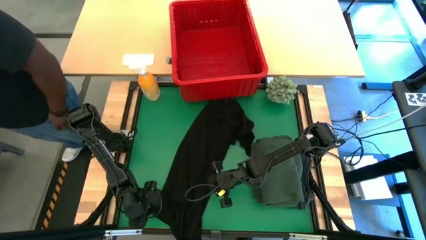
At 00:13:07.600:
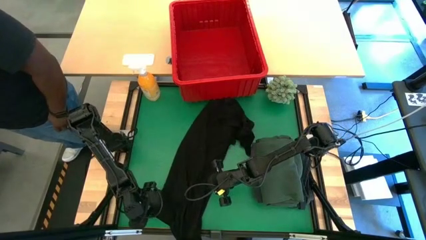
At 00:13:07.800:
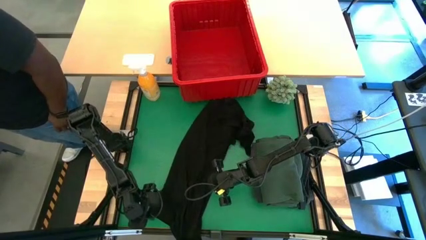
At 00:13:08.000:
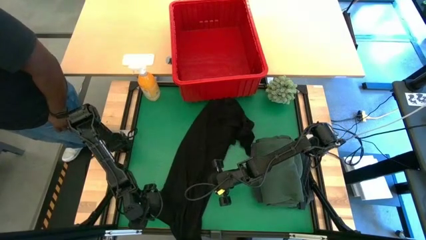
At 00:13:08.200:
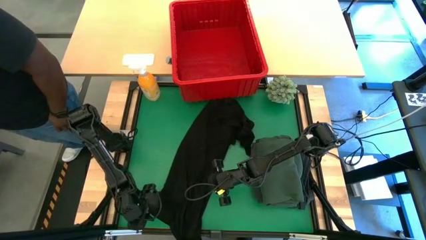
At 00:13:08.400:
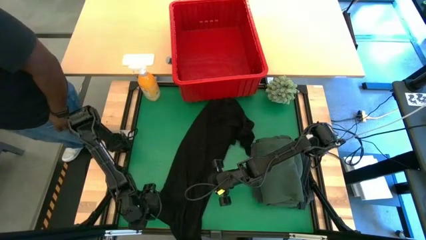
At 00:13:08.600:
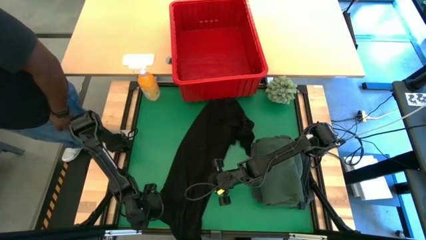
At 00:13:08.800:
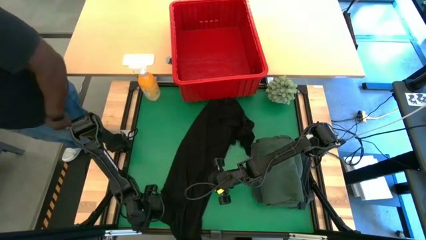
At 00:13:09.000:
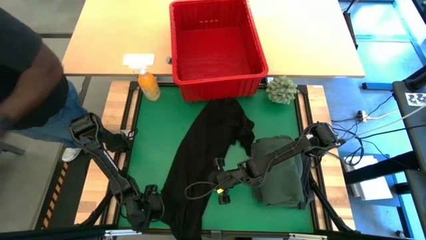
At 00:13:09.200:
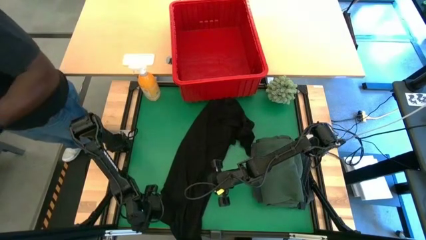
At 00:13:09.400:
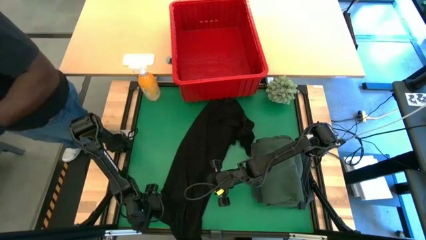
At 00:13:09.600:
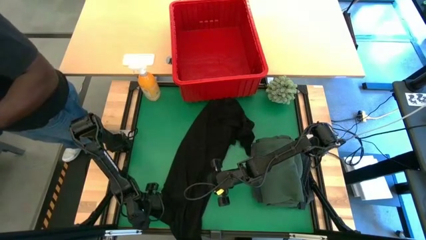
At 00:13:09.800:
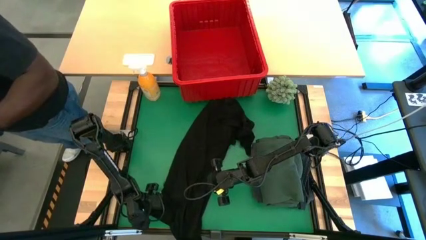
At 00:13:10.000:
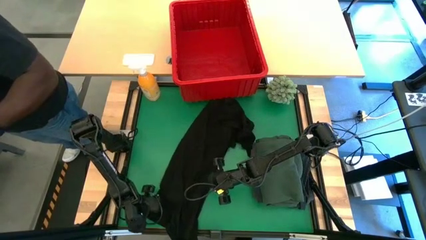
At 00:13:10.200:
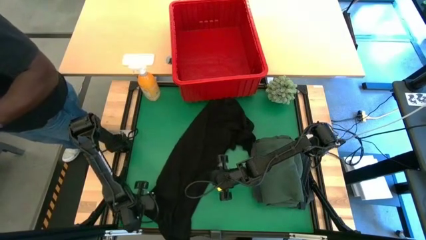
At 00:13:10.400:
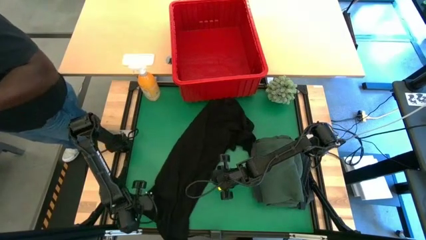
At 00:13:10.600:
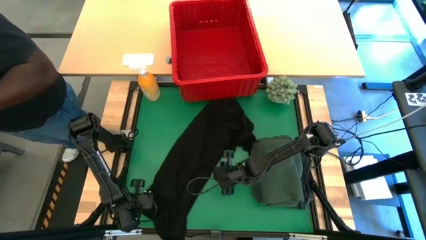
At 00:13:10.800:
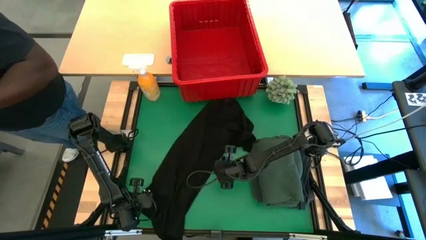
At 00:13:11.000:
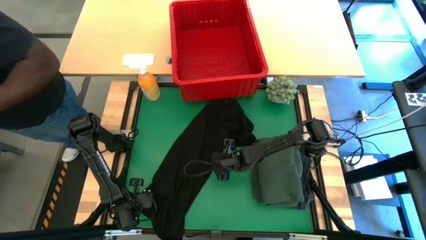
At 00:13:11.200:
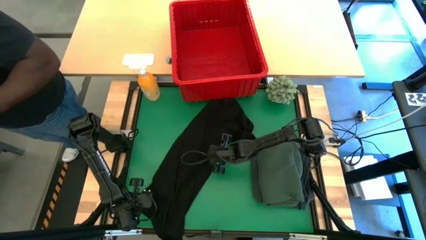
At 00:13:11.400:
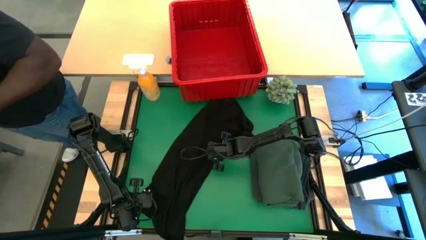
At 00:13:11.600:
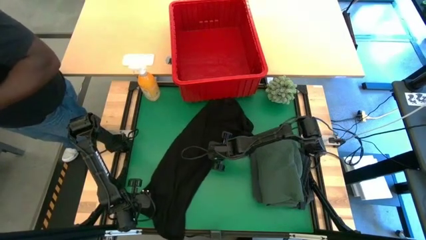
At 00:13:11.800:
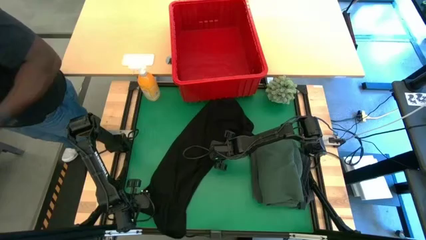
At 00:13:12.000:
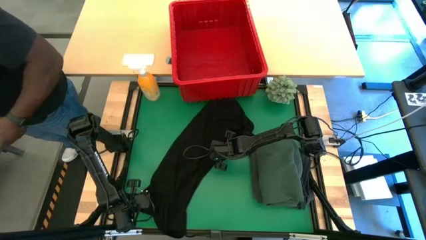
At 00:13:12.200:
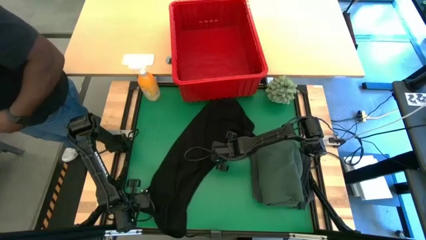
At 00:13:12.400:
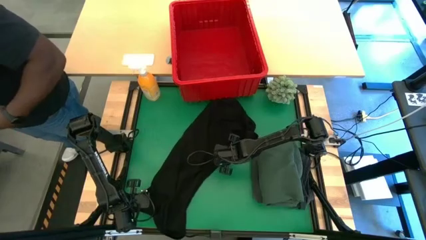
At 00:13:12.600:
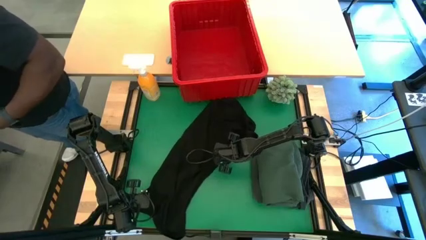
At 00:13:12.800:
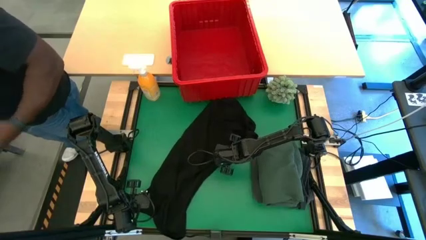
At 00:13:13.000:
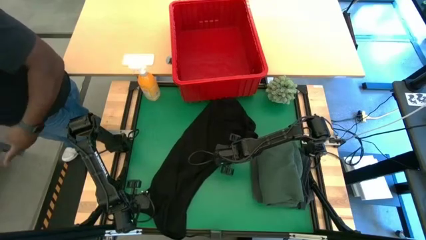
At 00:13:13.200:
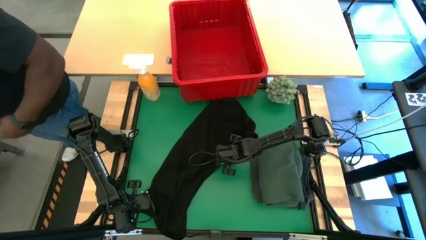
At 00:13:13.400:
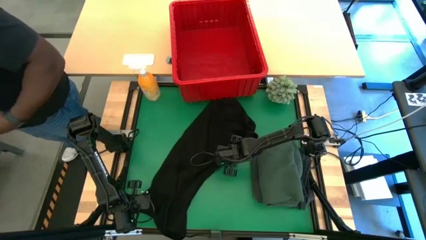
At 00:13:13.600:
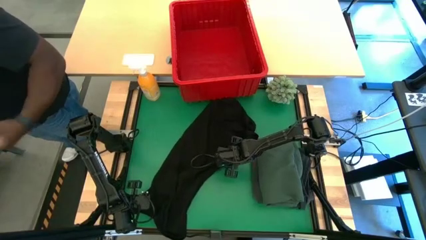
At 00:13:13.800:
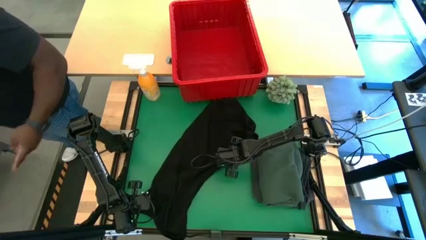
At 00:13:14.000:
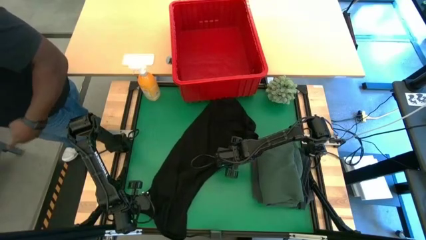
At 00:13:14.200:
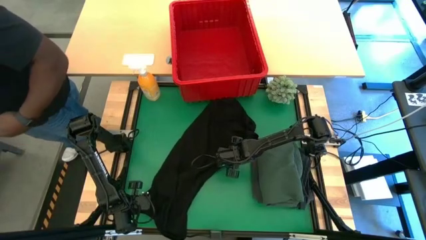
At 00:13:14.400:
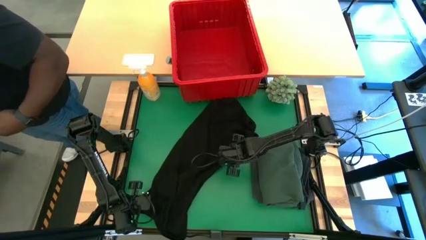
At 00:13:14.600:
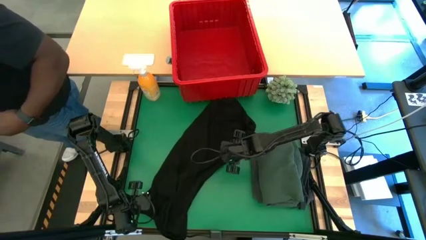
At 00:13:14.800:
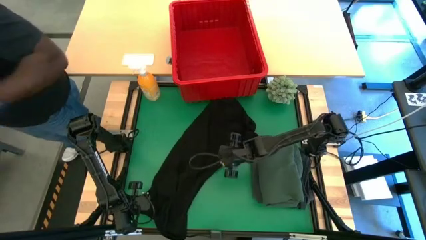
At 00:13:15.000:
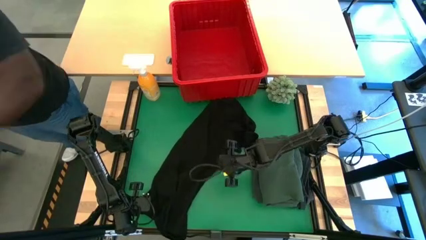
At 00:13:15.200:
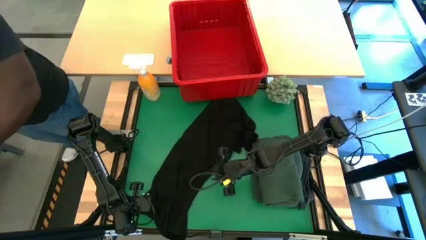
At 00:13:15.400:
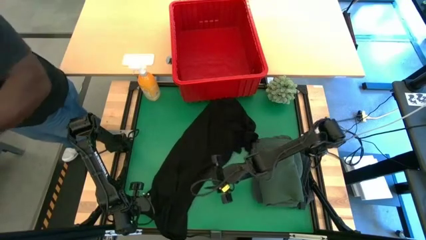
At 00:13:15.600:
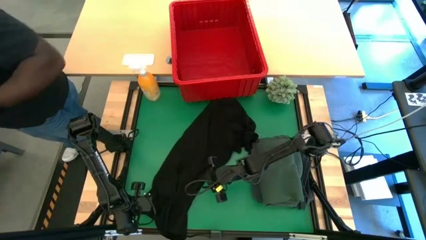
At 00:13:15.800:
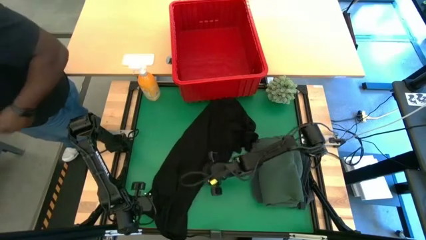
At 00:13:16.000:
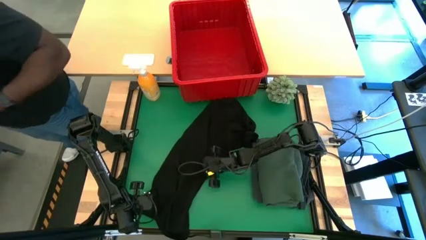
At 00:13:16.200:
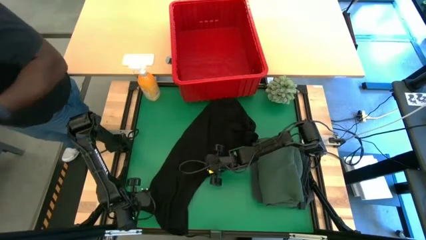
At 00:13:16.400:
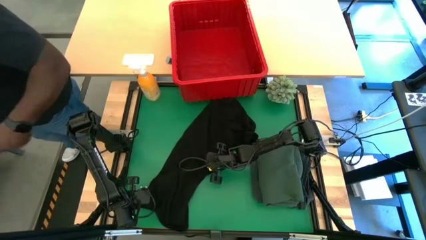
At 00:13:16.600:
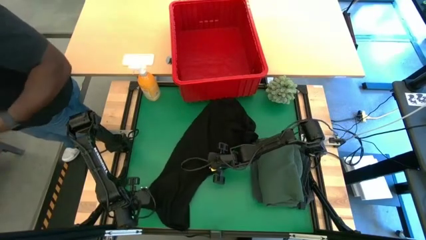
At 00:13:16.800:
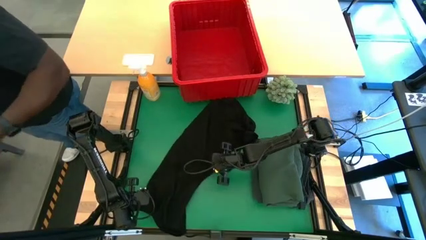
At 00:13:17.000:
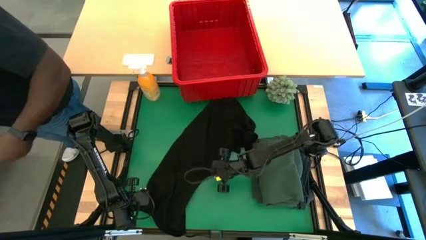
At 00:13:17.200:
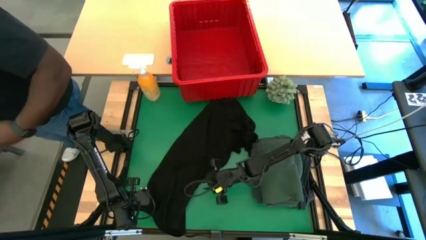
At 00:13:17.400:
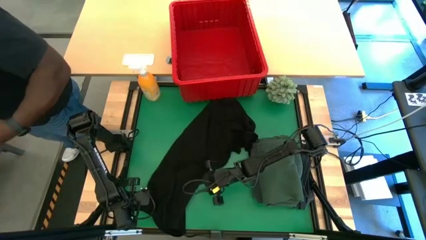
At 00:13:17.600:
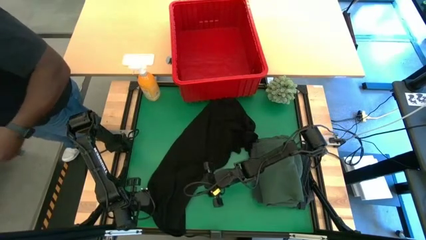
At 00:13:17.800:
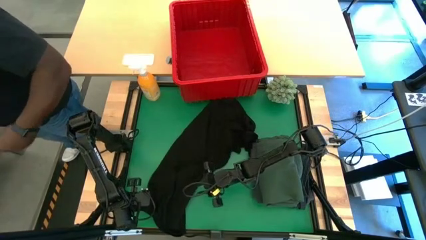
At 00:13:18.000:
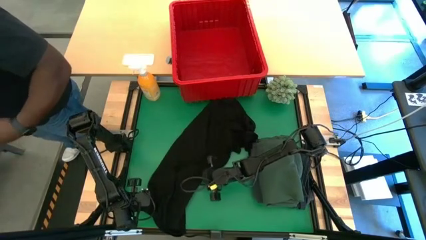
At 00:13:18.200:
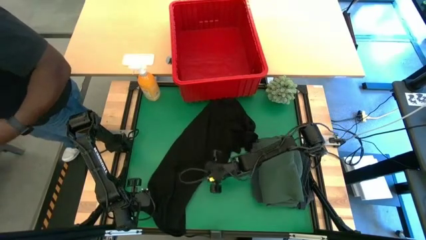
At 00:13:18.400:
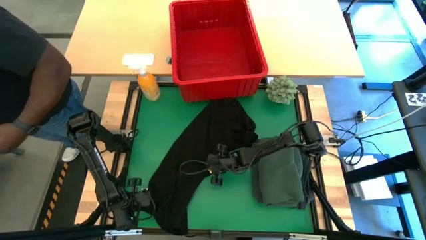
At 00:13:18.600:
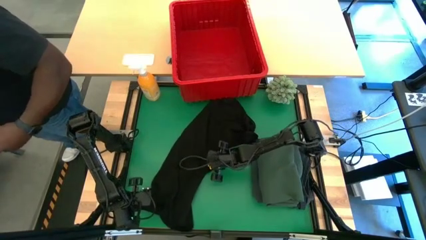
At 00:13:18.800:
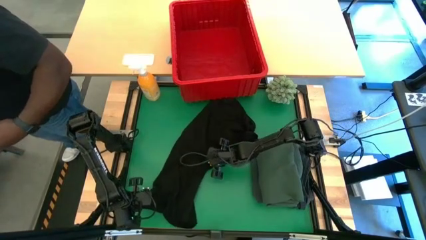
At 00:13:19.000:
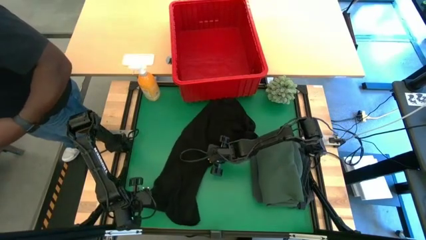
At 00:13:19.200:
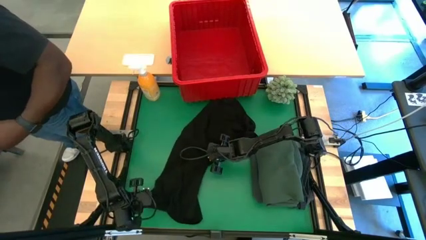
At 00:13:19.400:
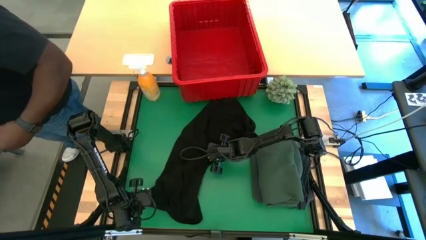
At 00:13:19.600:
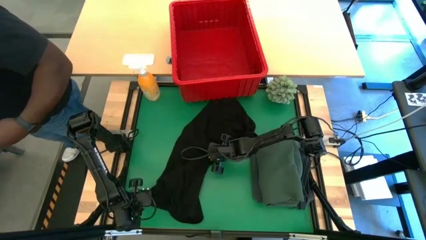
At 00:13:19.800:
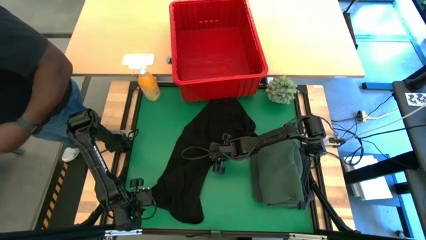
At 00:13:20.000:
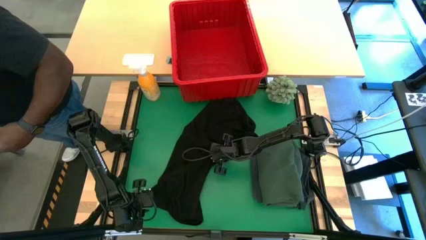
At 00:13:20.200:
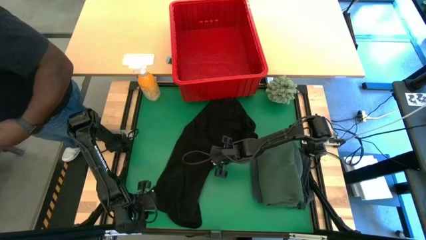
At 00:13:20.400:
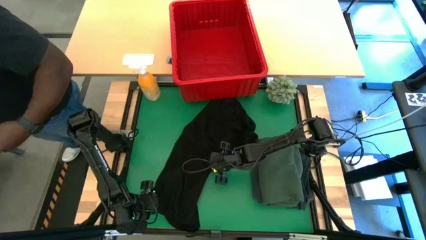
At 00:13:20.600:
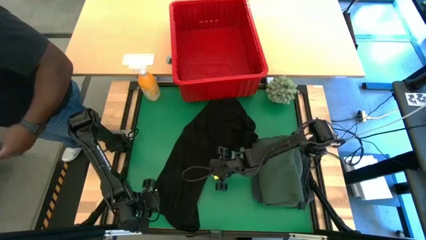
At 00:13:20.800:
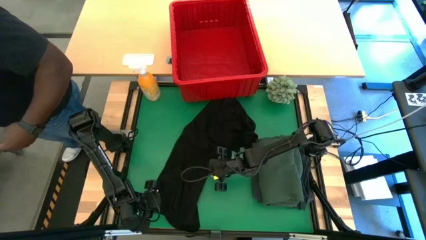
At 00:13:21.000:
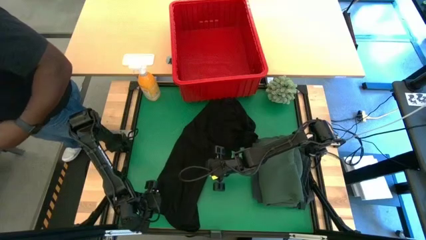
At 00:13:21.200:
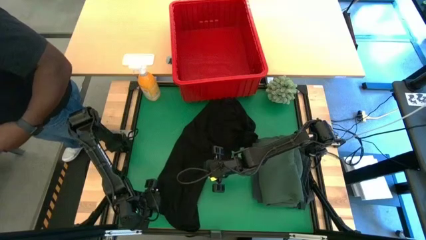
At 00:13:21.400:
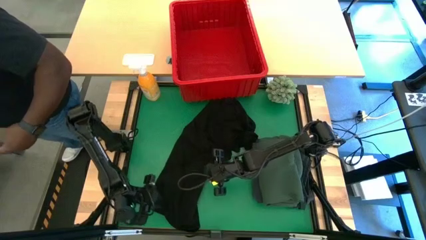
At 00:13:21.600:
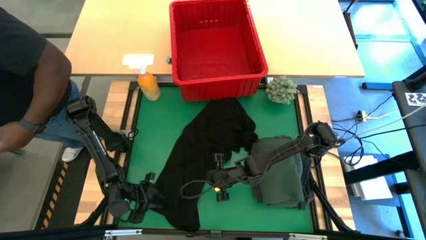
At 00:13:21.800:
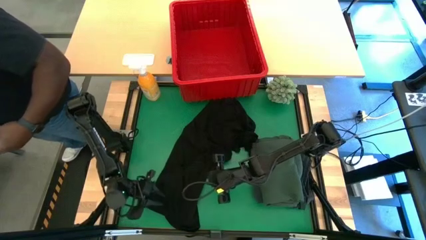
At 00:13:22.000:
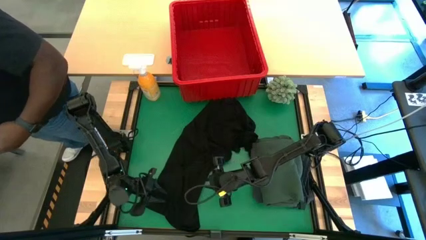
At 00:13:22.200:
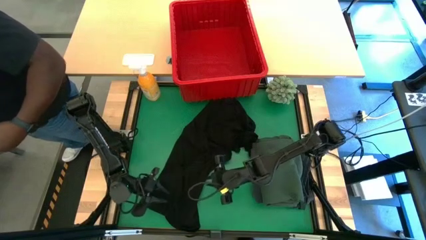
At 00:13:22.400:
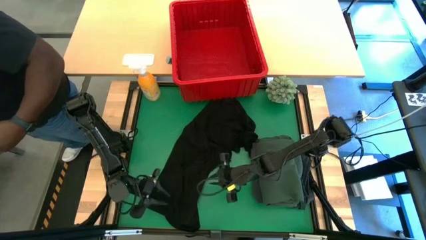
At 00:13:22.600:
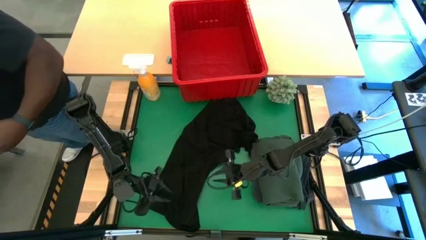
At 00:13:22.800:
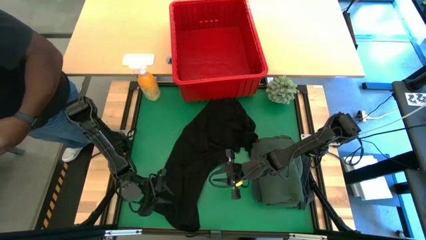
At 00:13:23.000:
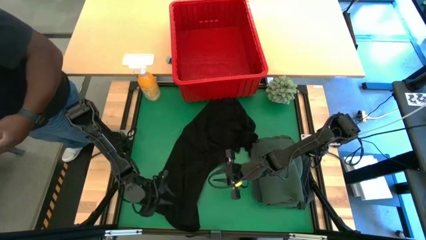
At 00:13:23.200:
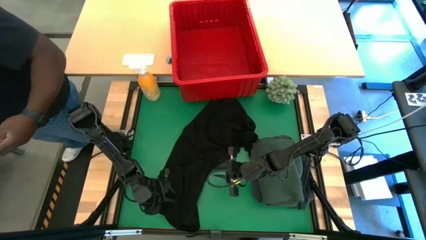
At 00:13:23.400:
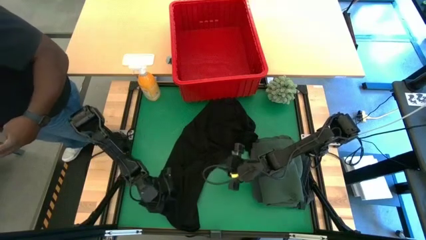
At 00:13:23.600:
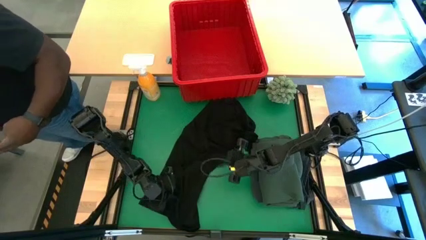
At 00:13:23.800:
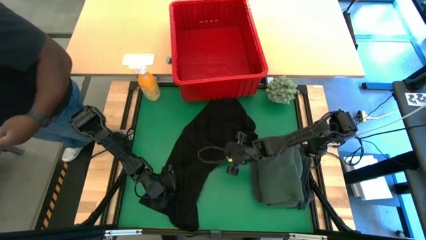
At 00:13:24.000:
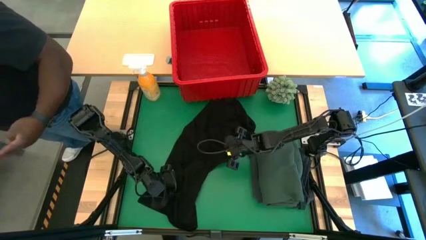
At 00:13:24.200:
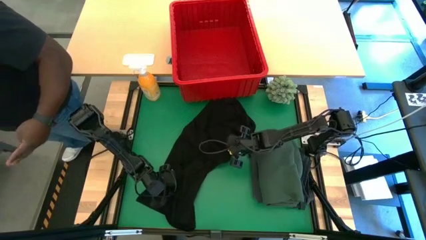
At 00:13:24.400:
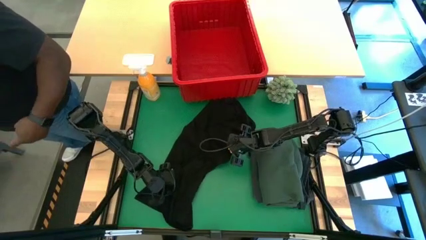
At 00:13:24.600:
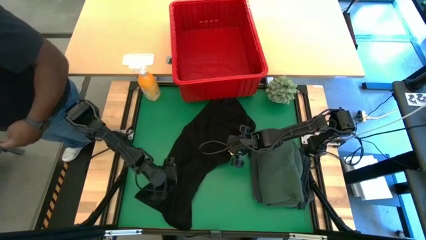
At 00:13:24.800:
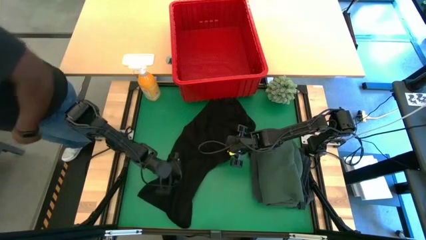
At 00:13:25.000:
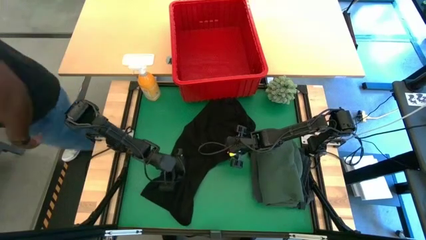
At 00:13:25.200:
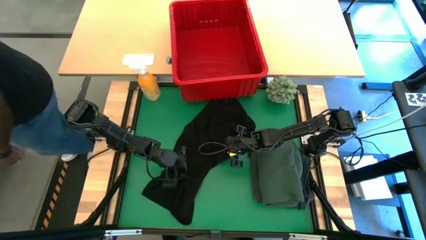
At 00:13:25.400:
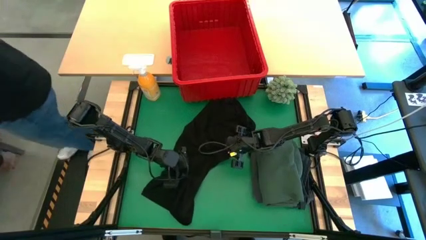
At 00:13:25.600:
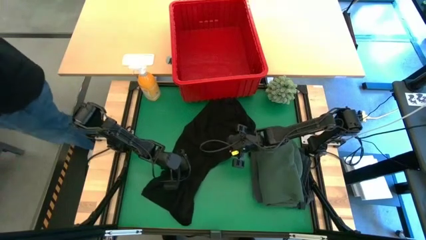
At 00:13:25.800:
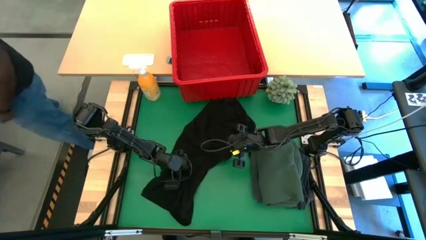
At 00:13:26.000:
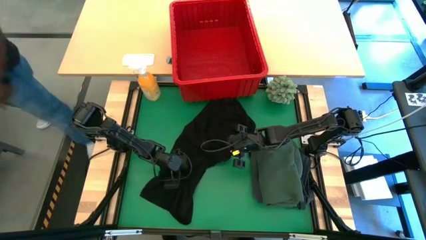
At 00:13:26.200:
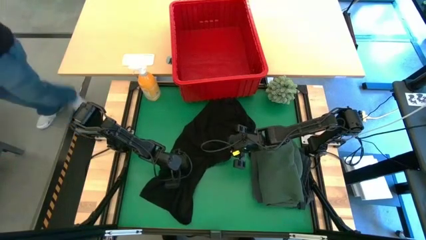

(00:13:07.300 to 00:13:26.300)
Task: Fold Laundry from Bin
Fold the black shirt
